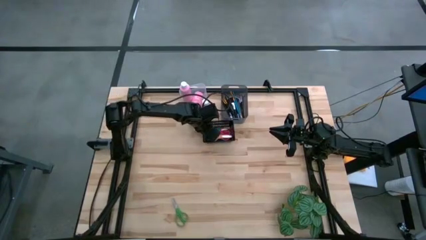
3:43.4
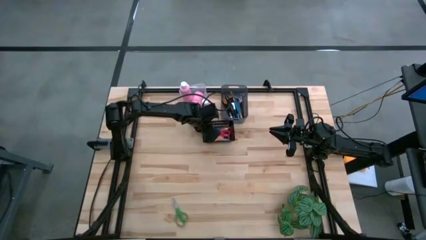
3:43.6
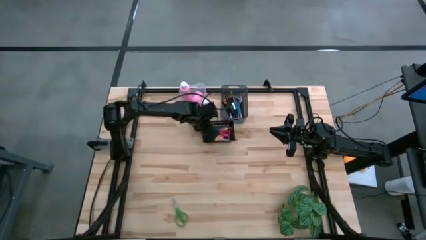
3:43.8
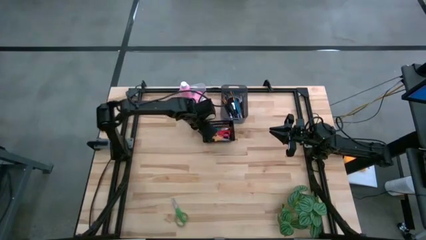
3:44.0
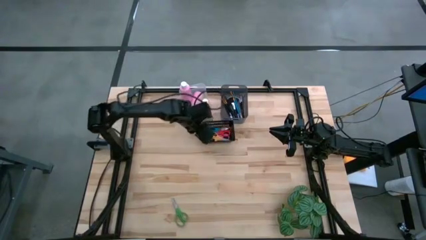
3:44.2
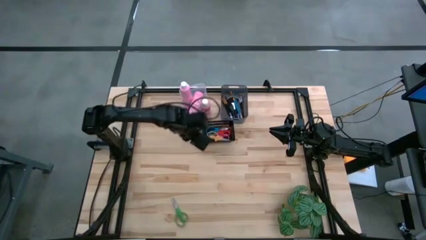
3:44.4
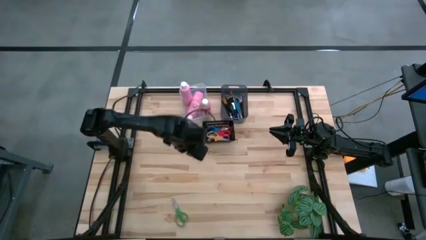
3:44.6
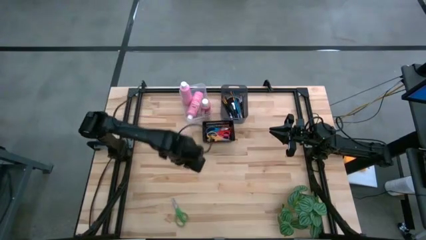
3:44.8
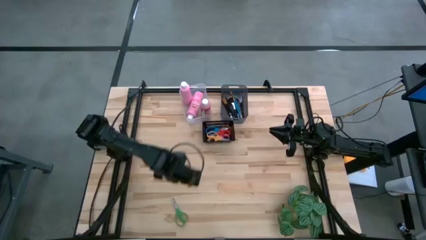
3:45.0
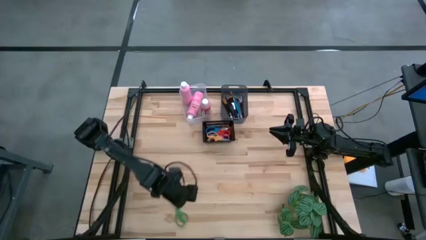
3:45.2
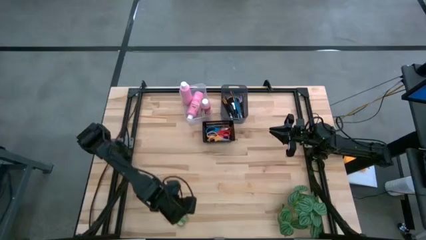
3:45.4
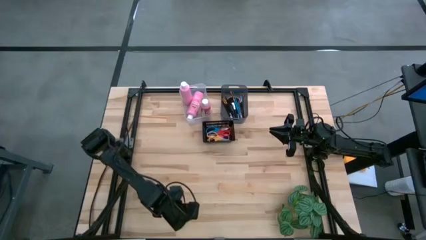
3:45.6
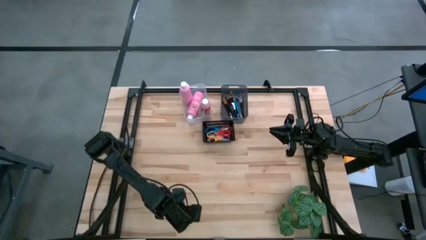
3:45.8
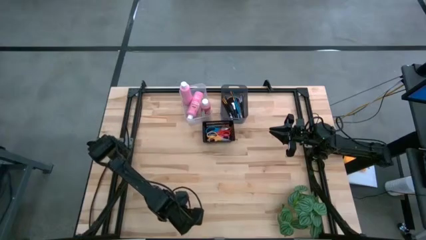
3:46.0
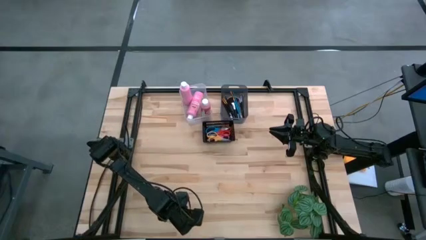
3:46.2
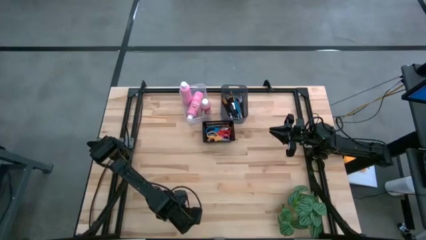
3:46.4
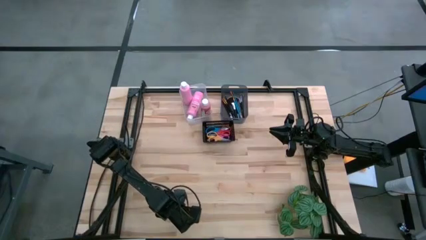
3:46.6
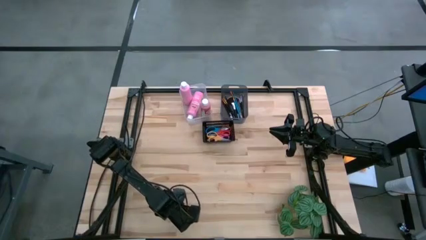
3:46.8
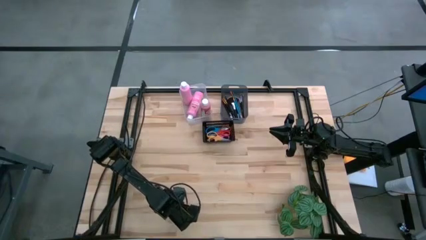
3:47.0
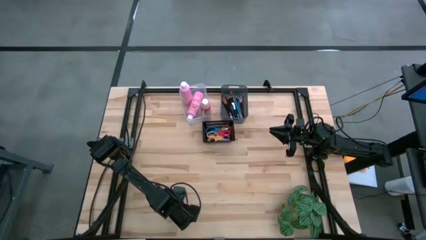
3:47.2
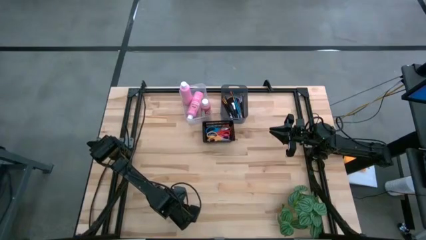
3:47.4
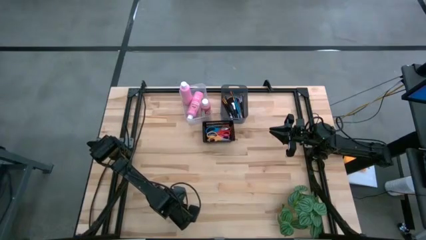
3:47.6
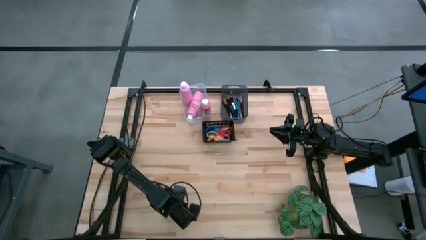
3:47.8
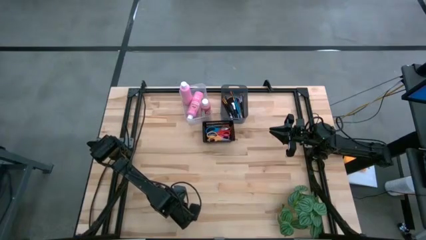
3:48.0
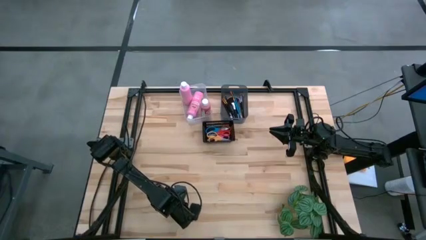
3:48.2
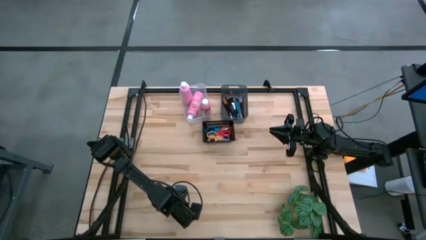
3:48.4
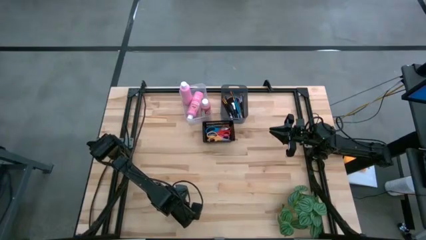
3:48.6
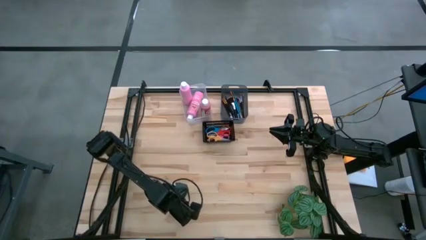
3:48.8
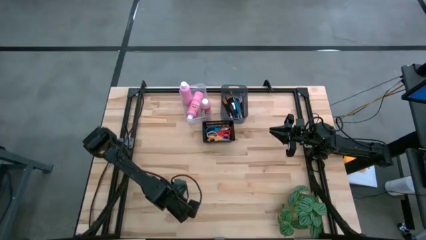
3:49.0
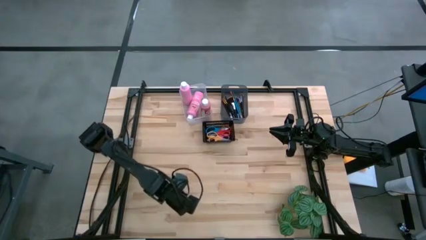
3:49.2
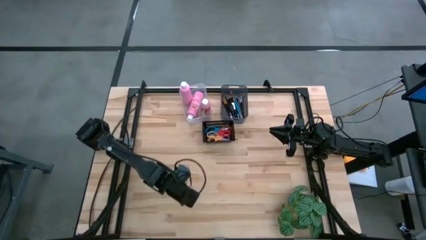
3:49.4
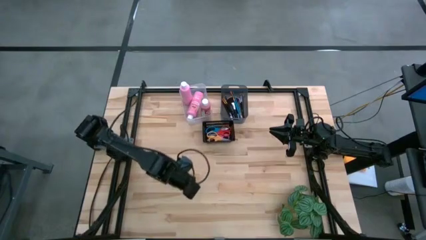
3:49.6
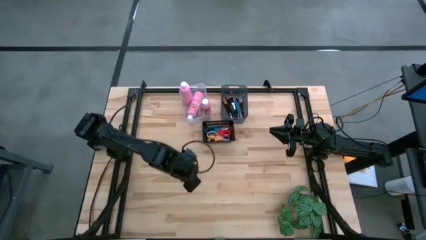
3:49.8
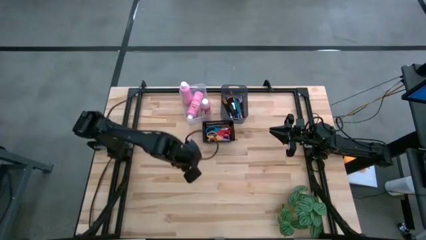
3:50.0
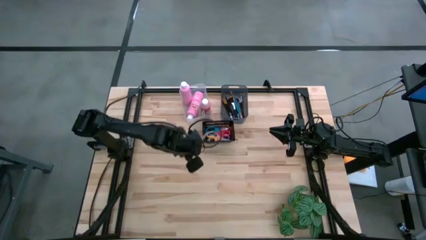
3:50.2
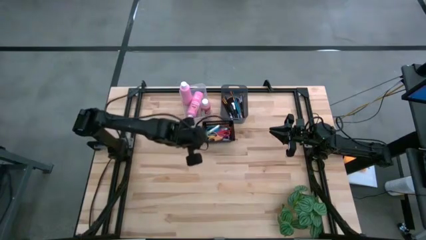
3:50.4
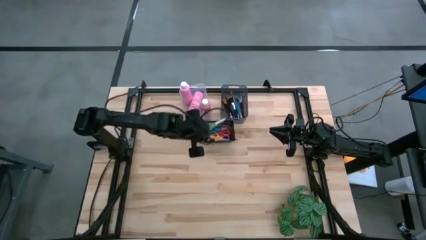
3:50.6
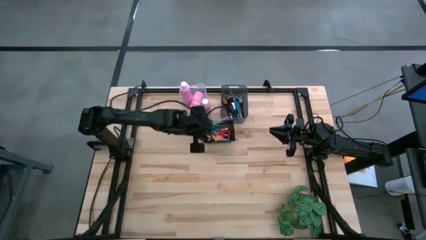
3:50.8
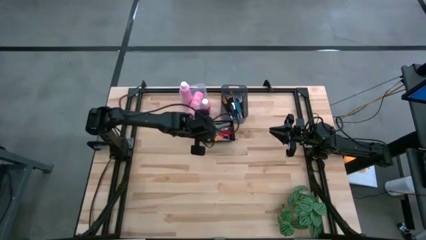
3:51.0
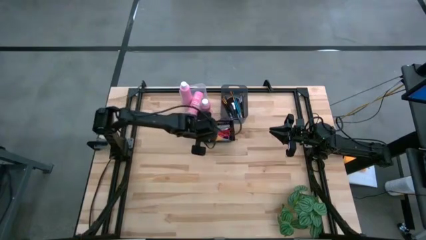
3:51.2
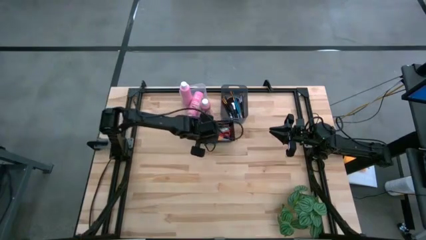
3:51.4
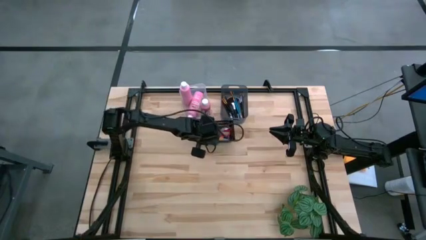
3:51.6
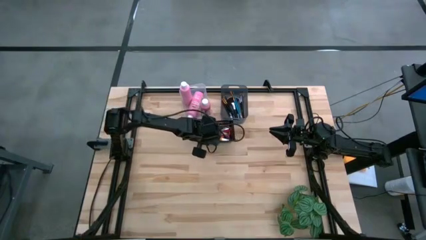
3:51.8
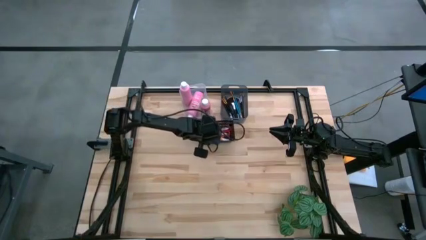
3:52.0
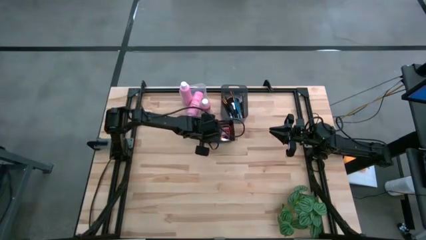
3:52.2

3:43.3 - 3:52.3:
Task: Pick & Place Paint Supplies
Put the green scissors into the black bin

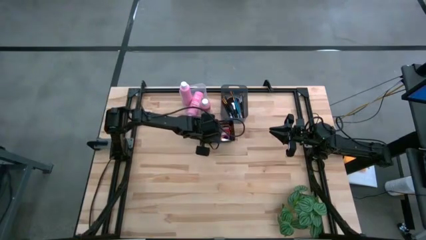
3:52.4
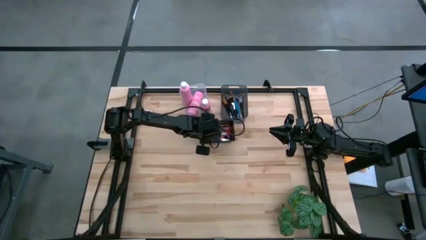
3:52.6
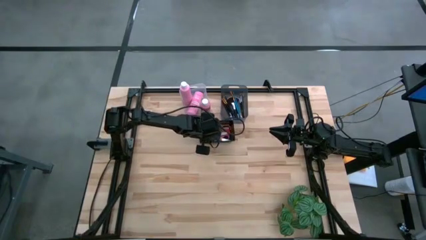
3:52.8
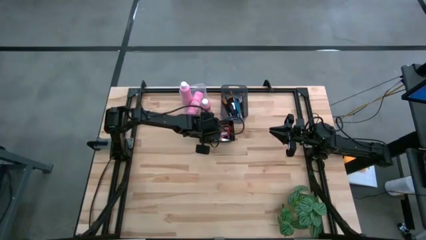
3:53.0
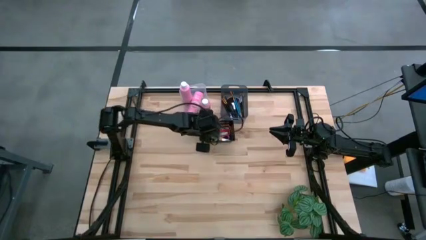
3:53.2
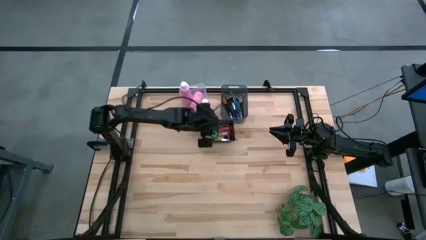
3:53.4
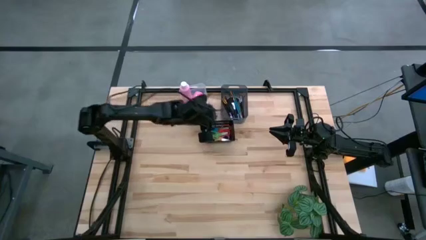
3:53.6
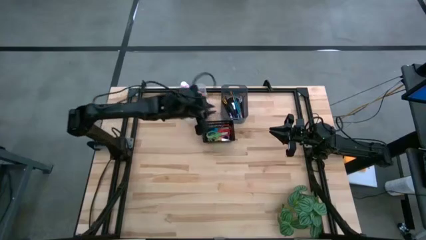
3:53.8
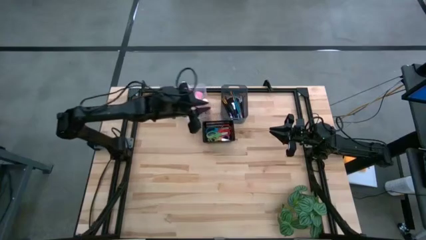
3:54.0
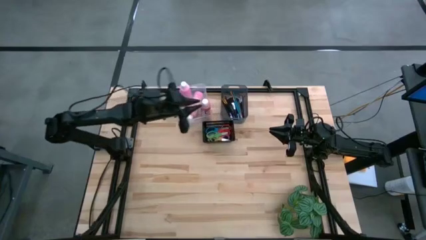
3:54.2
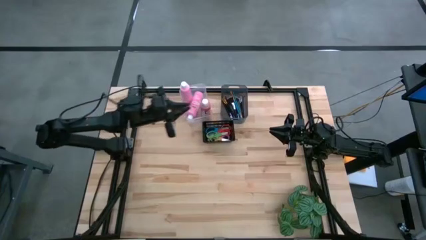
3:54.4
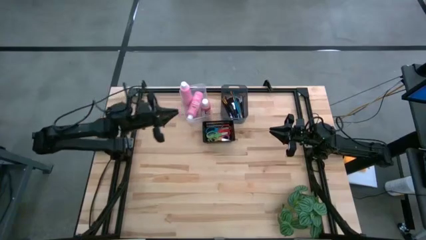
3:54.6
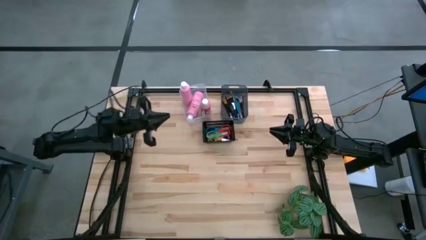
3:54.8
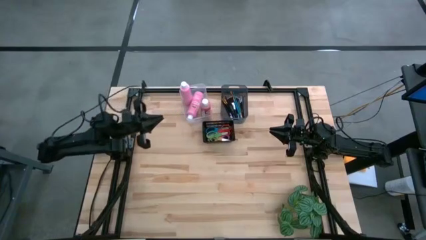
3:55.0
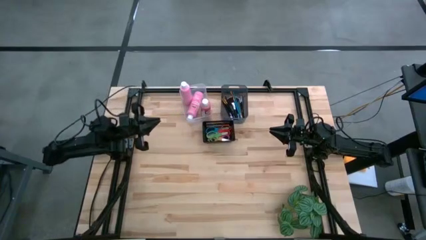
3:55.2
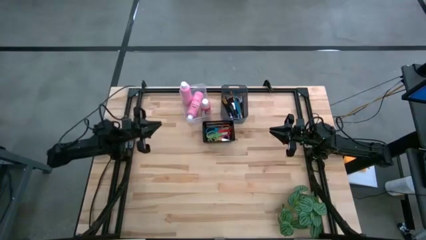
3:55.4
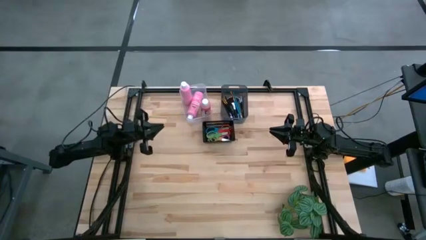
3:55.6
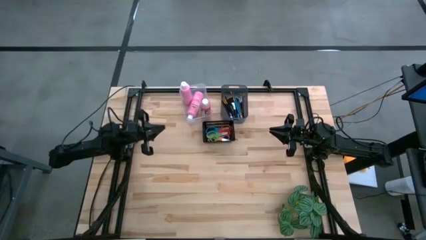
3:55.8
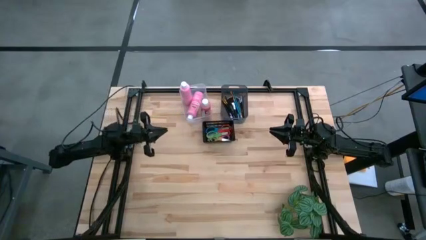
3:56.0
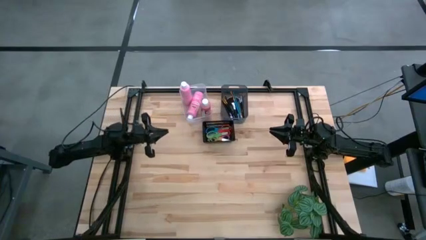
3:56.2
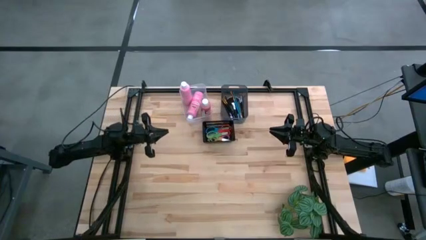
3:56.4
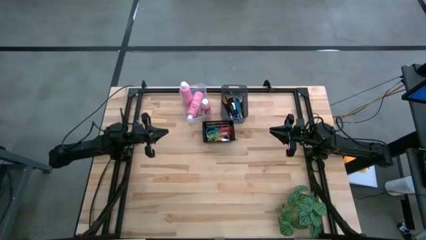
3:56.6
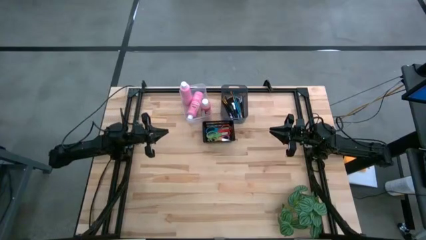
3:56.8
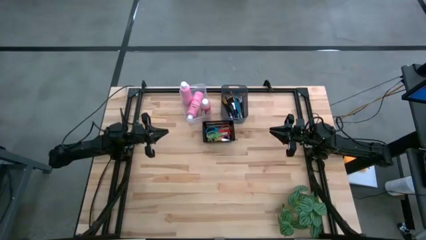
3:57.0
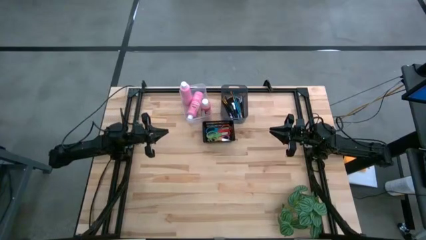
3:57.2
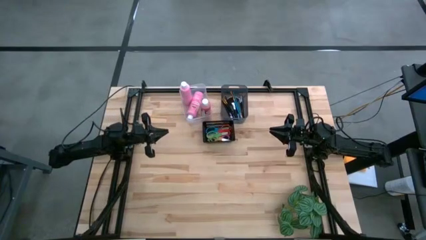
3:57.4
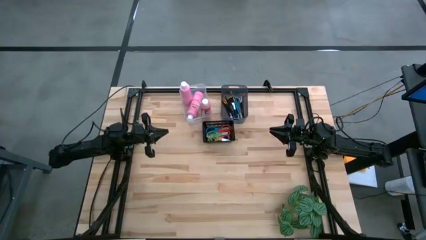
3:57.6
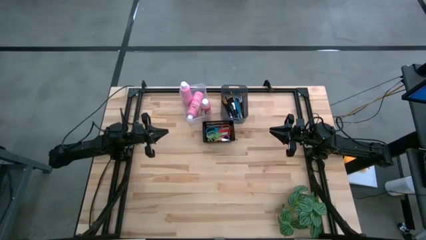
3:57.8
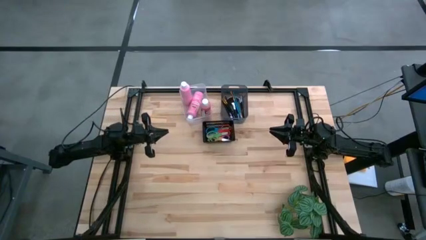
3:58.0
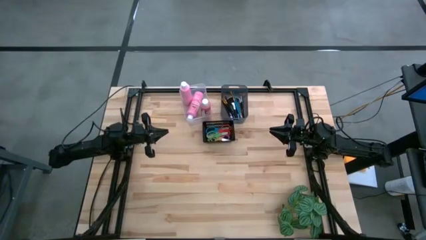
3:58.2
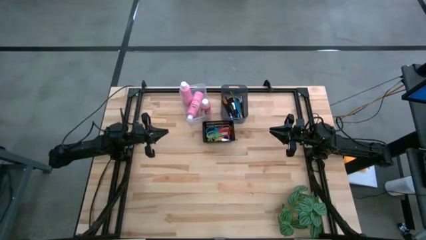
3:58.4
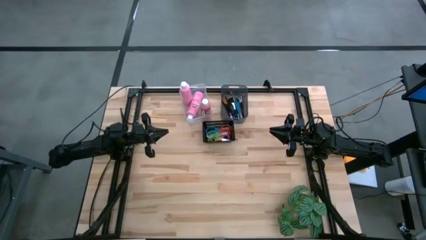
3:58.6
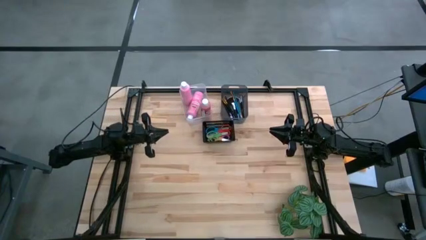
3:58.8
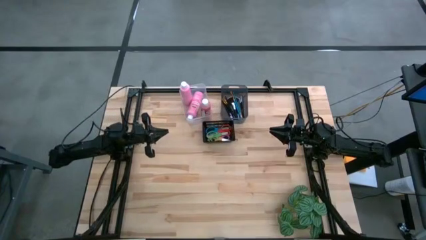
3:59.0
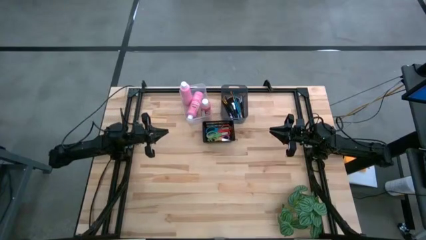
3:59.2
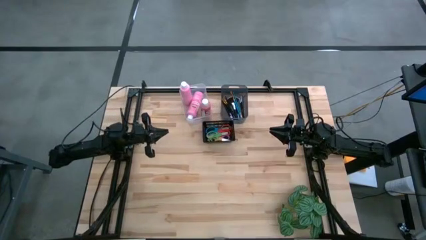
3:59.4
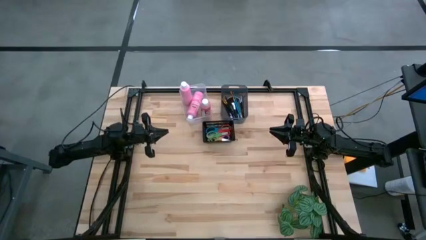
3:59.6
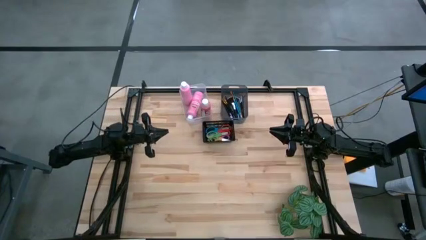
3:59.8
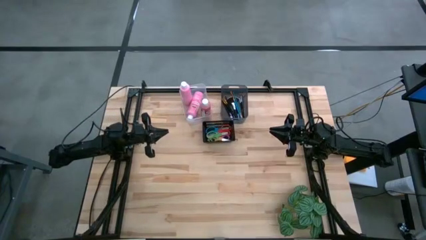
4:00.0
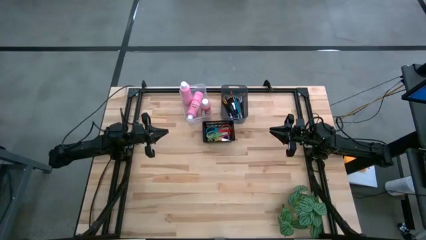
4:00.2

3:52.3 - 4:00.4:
Return to Home Position
